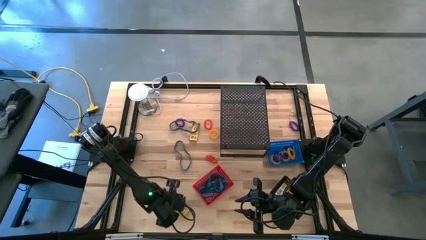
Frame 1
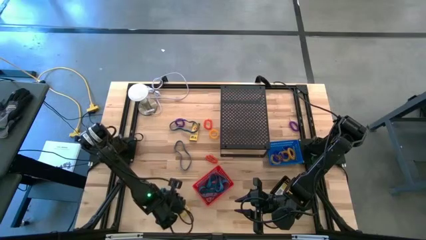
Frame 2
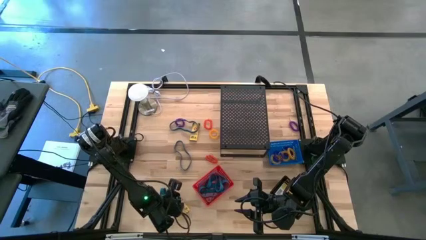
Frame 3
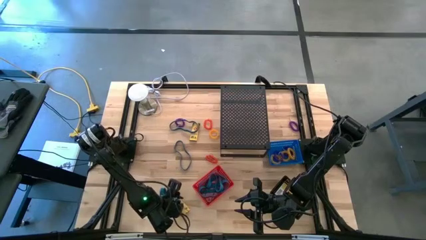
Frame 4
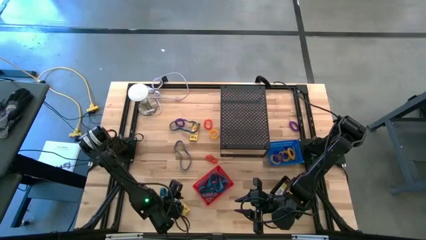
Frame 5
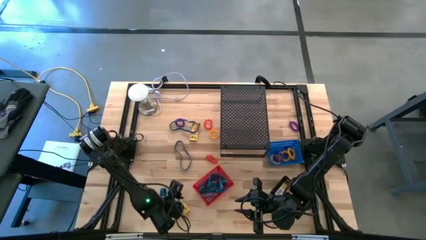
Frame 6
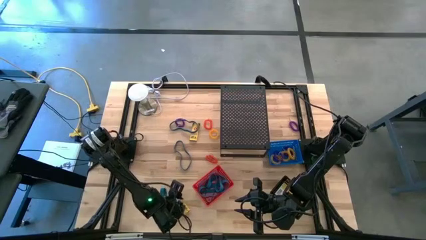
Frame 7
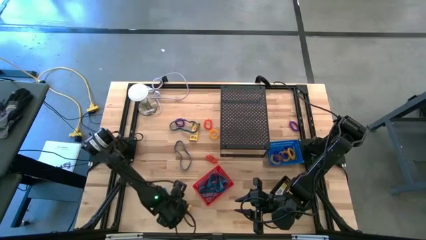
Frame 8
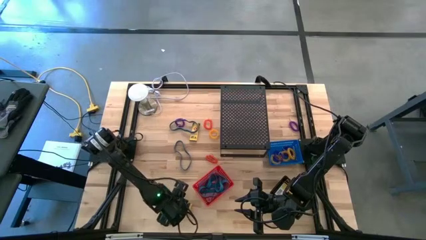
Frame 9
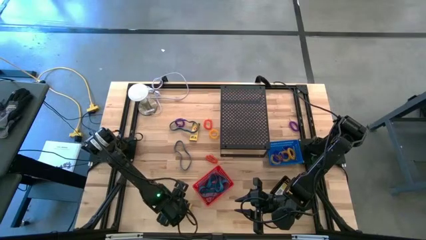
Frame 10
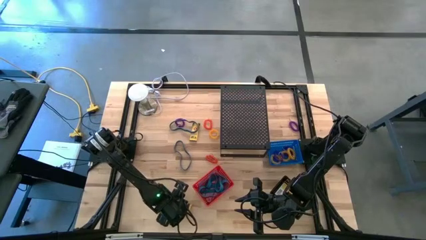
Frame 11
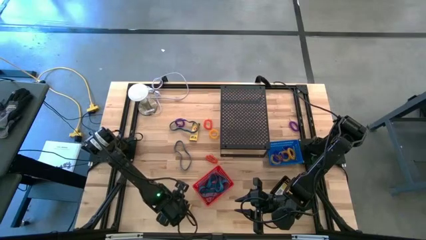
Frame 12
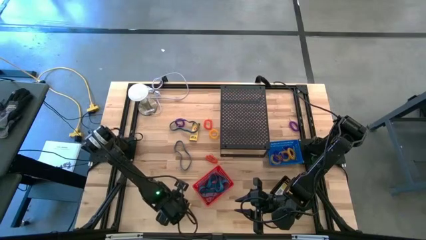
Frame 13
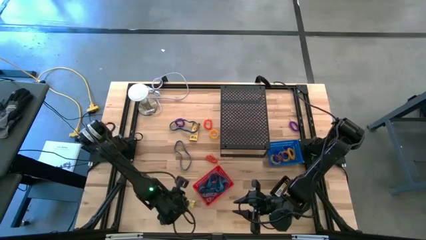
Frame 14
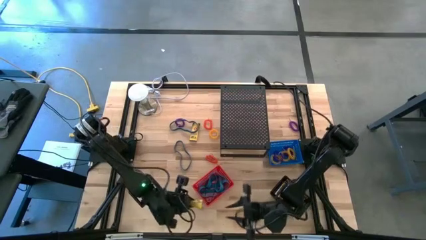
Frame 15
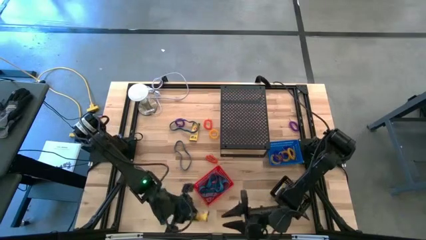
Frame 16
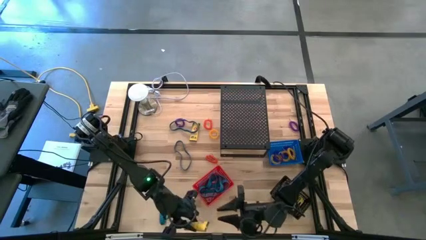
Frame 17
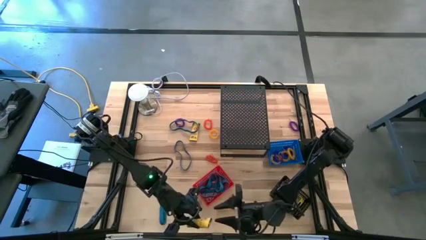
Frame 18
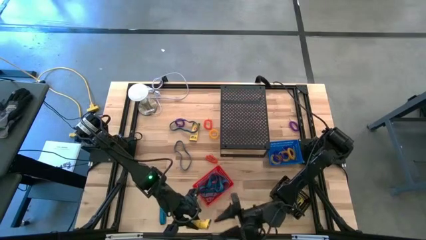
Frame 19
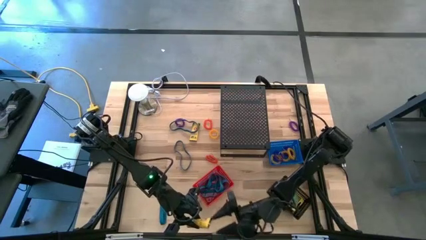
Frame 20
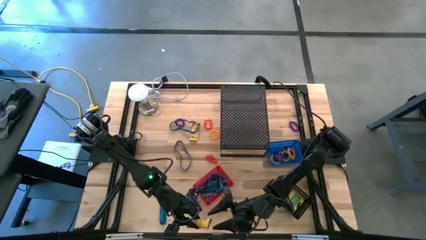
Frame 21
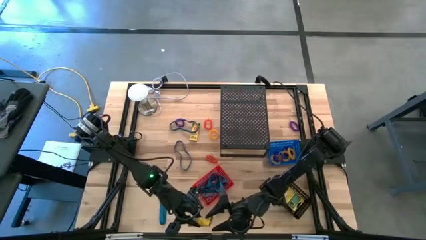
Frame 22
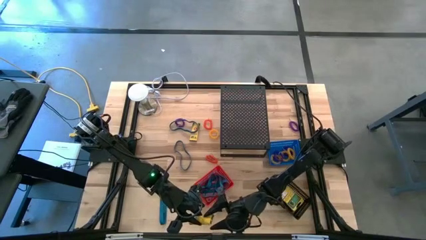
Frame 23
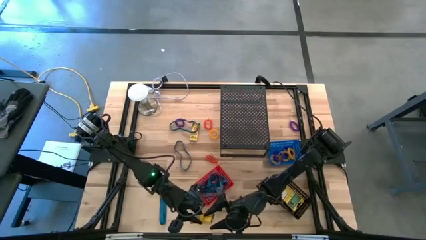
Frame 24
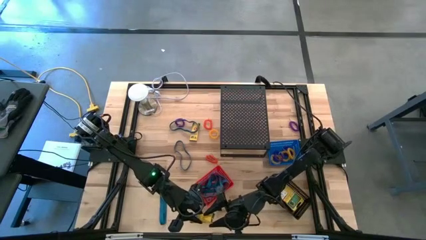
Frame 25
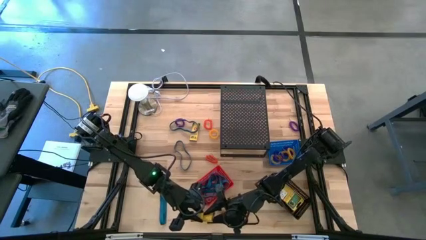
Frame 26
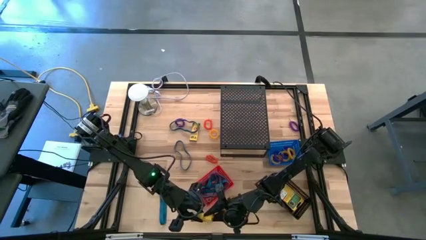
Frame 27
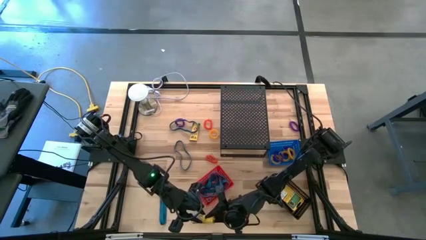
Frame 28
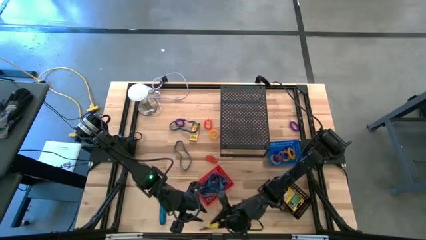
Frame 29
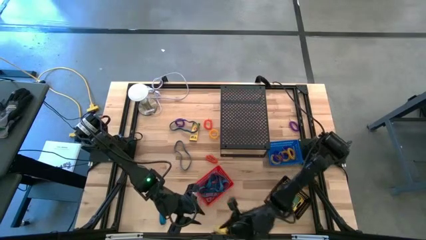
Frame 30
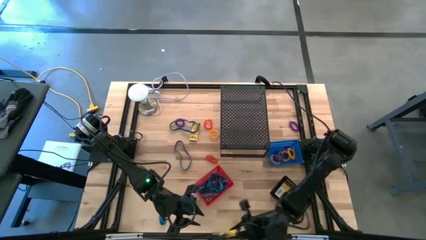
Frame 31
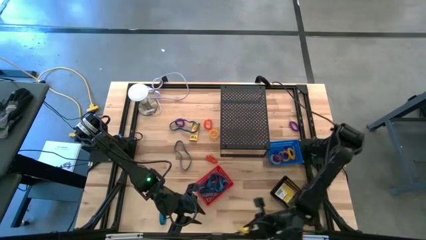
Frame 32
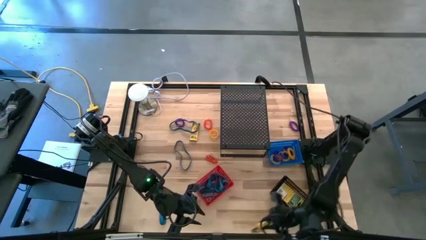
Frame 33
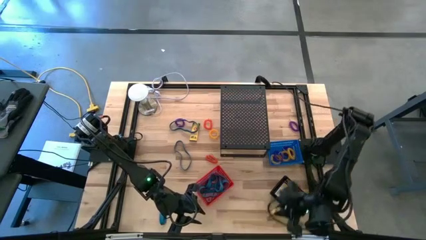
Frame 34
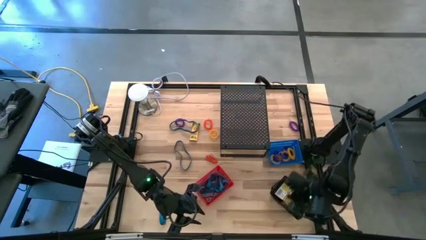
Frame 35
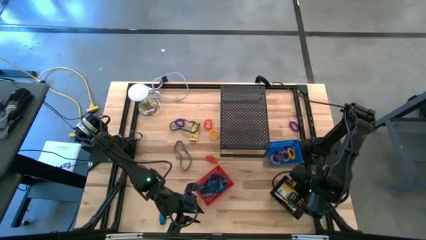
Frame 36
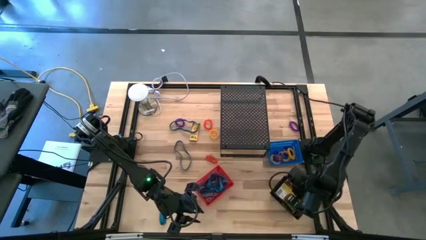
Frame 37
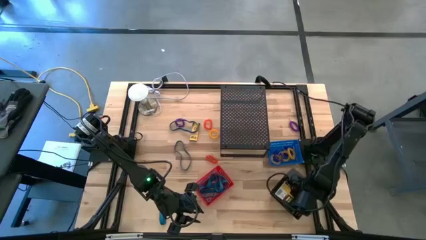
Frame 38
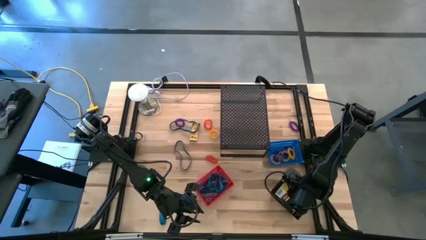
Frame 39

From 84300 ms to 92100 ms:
Task: Pick & Place Office Desk Supplies
Put the small crayon box into the black basket

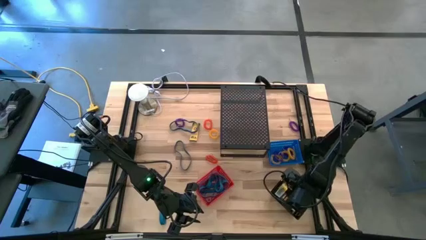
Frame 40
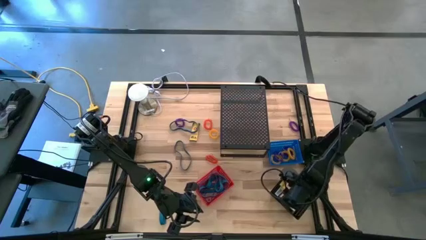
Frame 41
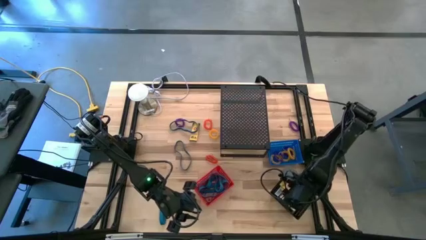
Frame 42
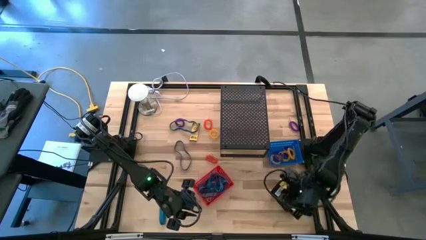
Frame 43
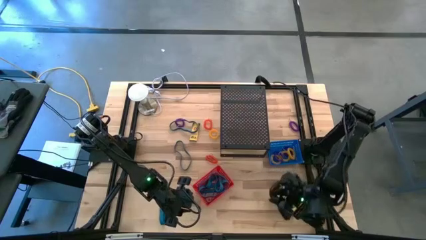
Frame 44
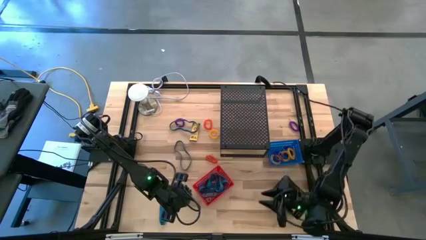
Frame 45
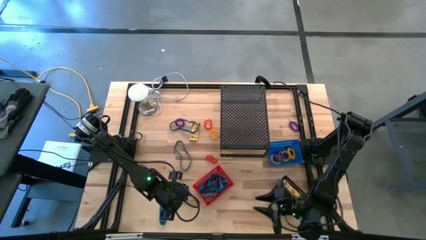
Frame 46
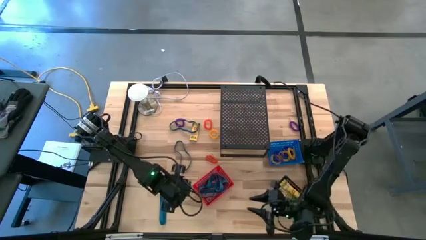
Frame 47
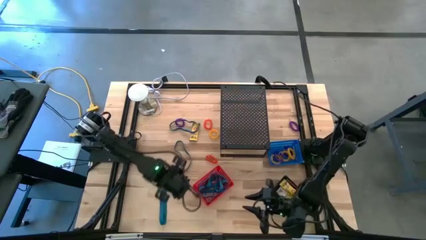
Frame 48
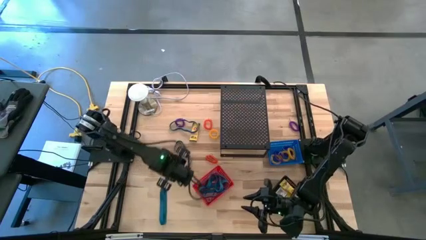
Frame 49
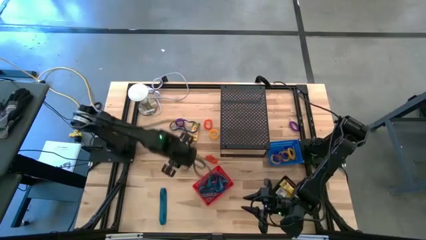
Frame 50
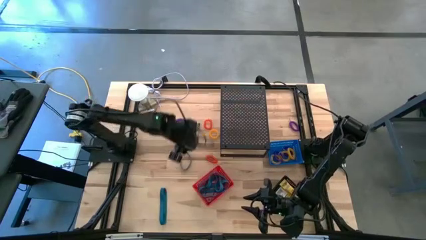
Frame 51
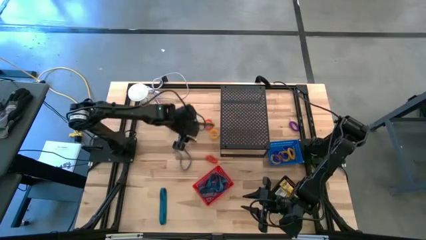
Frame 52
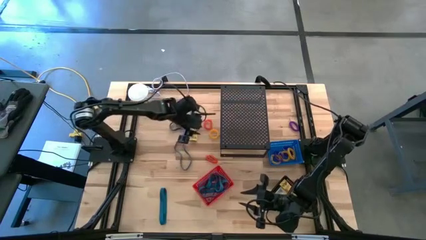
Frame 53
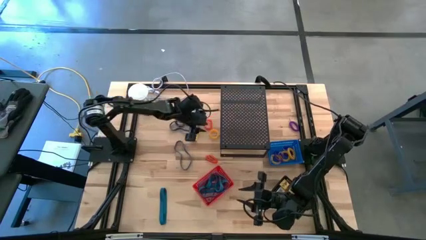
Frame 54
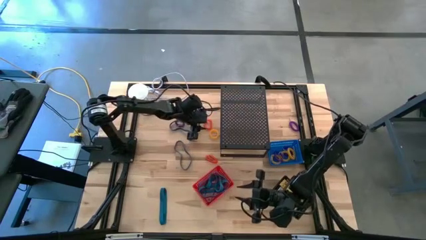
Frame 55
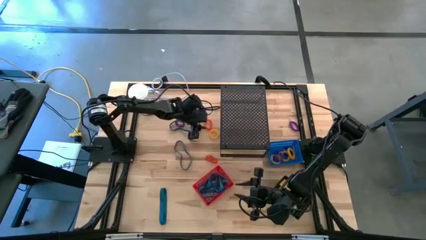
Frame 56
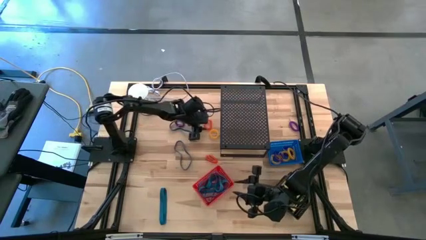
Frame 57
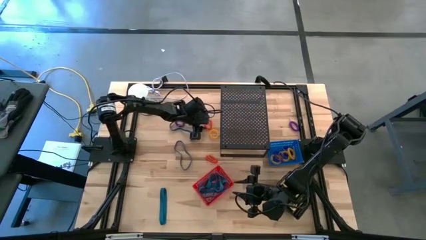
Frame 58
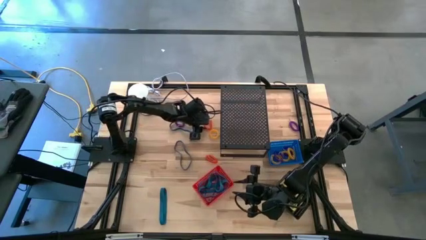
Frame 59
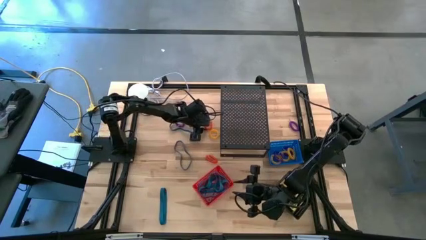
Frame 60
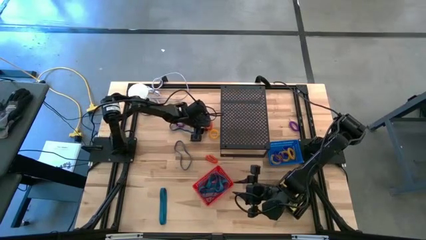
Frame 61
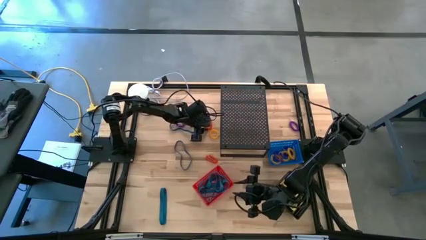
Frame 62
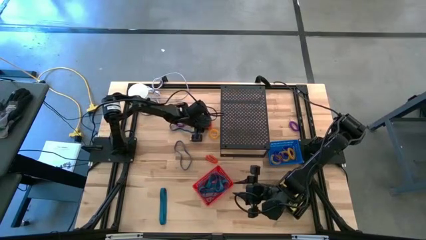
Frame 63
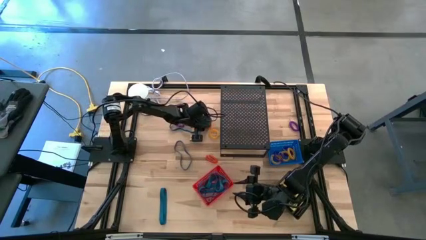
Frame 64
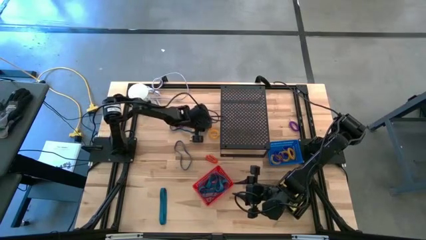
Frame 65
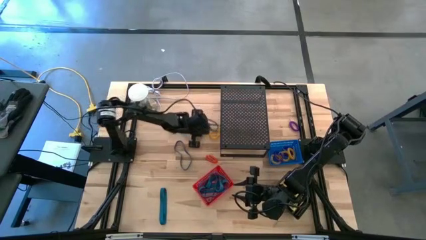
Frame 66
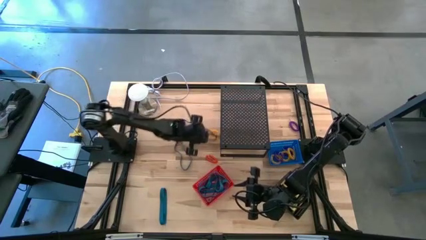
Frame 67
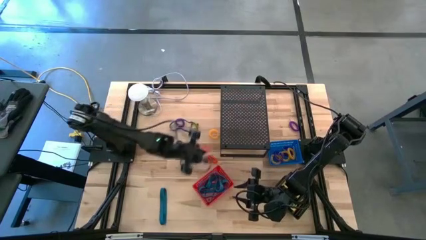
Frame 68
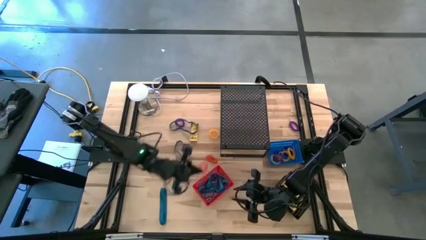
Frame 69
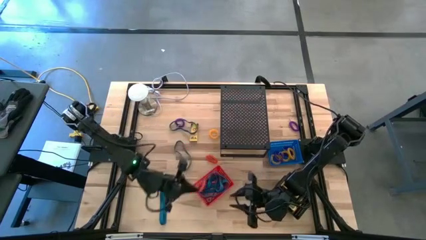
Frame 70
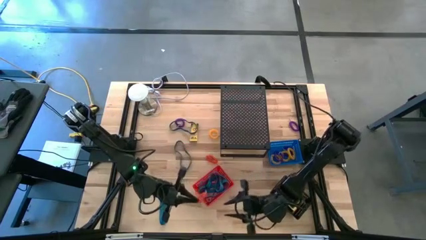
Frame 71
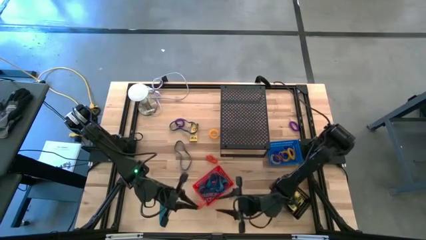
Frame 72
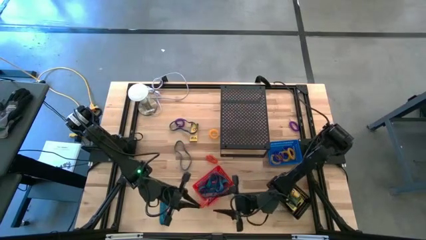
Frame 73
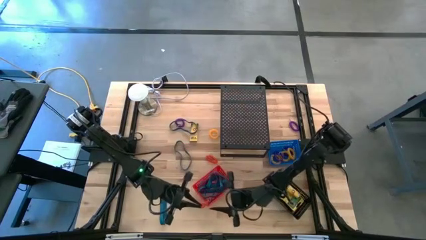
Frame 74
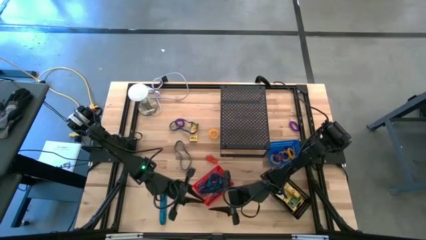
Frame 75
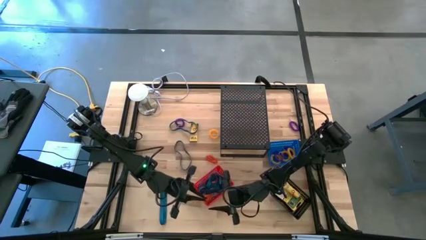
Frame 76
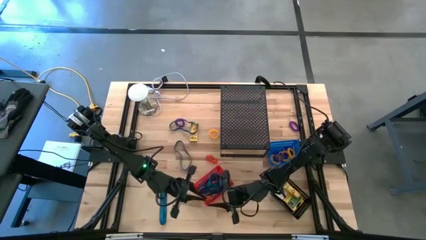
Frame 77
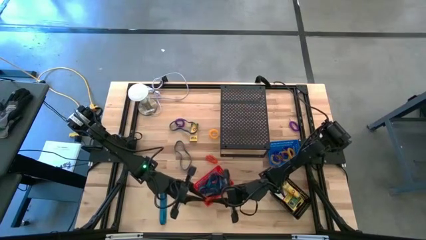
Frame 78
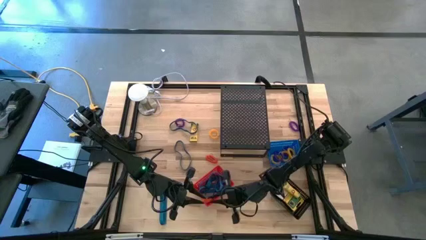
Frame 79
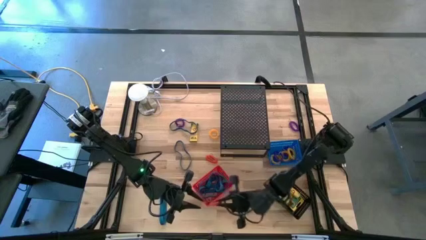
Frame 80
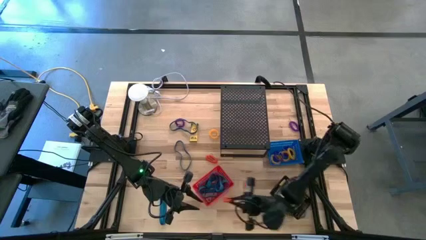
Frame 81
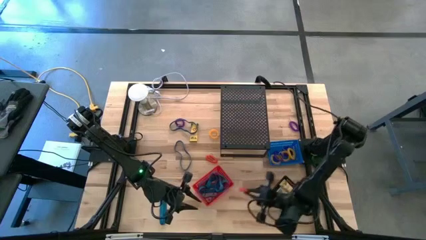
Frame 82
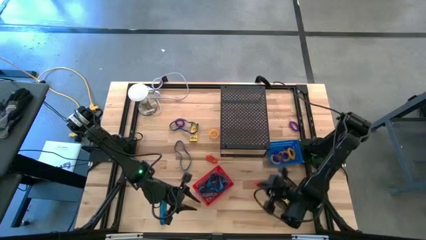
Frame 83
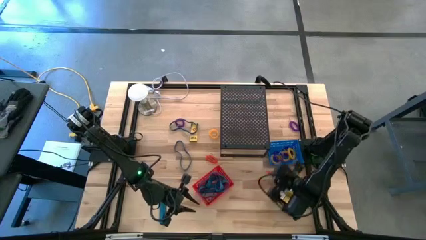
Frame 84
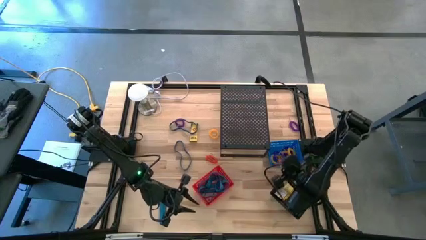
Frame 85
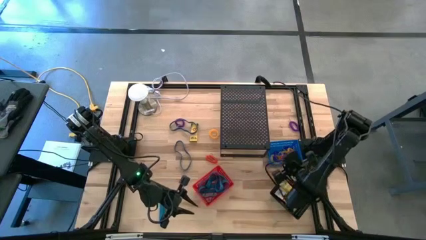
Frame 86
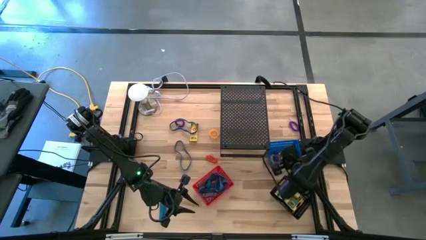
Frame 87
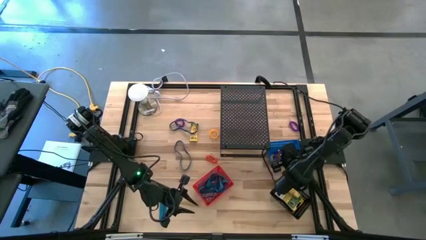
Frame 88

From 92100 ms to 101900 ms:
Put the orange spring keychain into the blue basket
